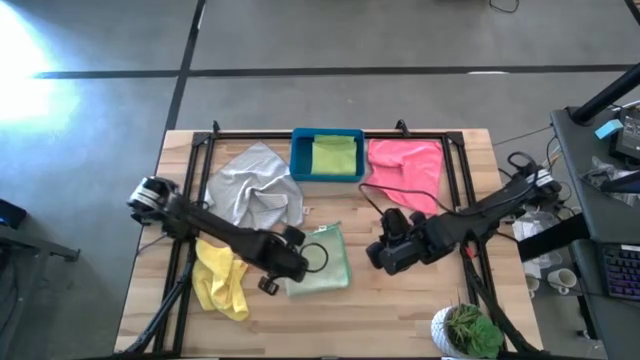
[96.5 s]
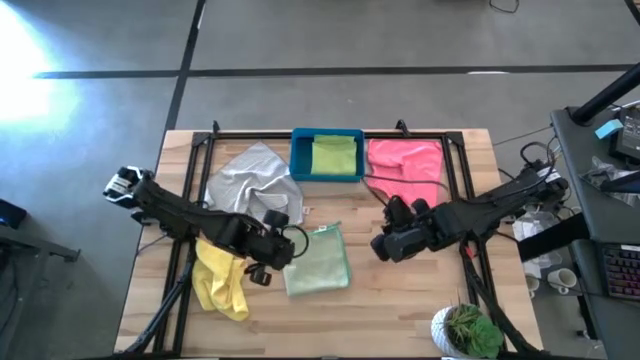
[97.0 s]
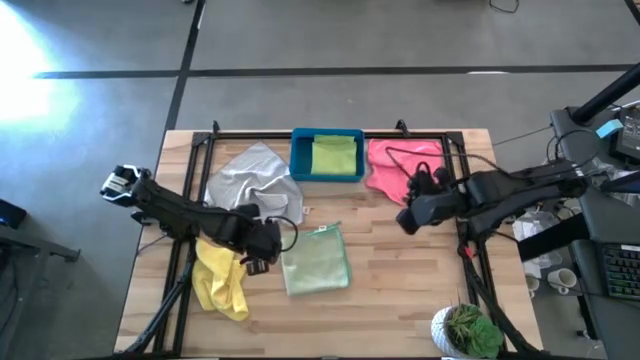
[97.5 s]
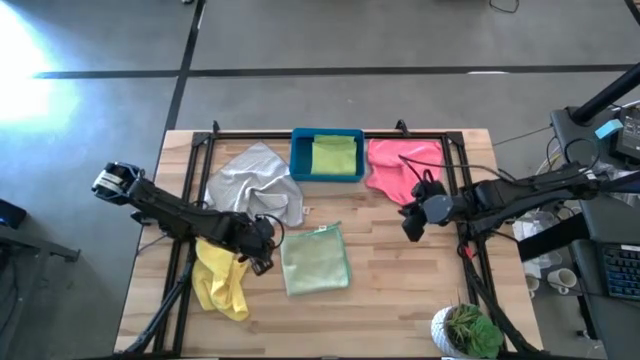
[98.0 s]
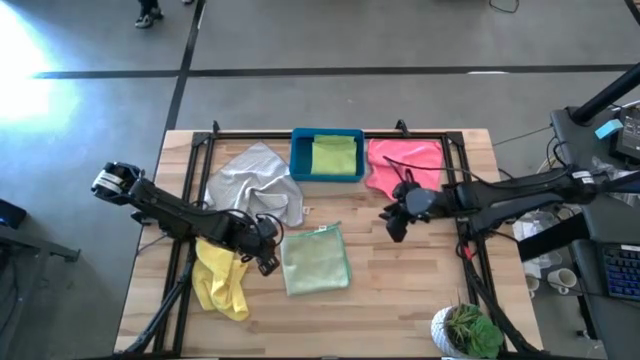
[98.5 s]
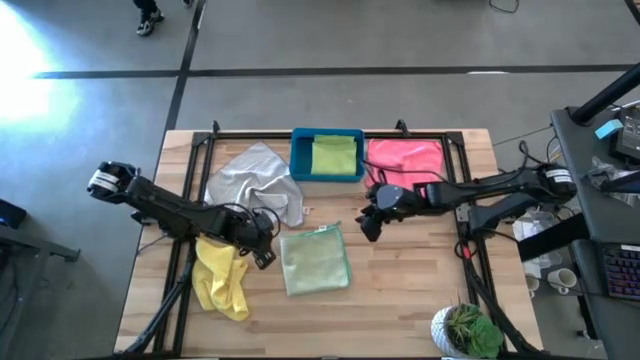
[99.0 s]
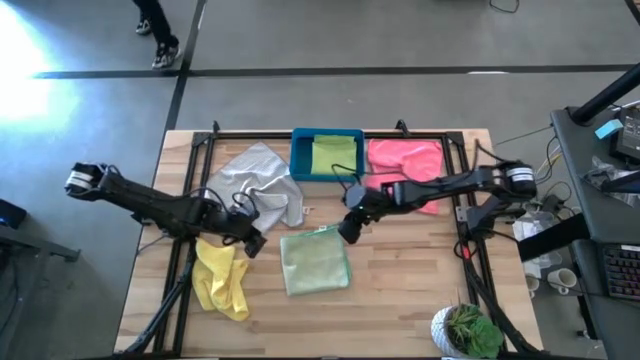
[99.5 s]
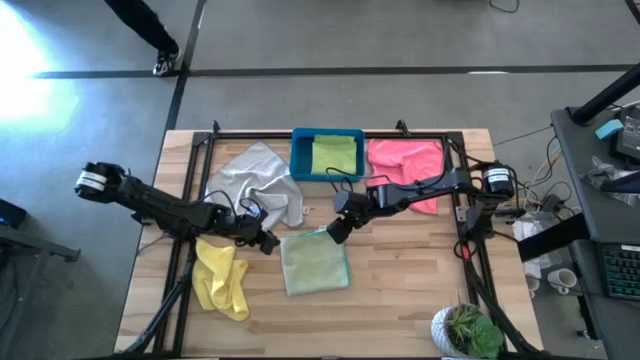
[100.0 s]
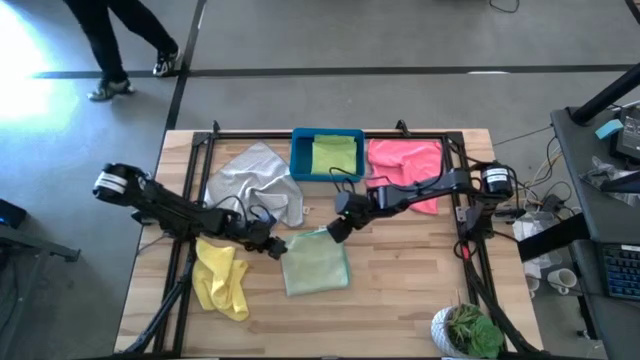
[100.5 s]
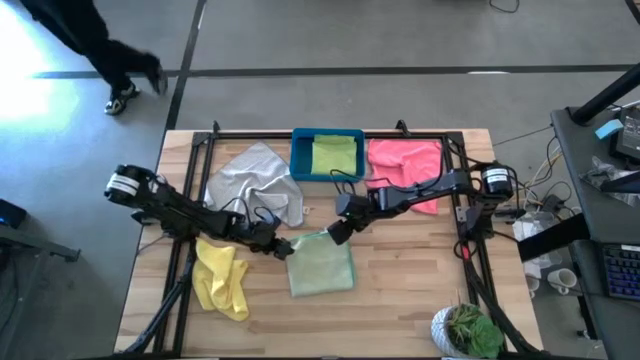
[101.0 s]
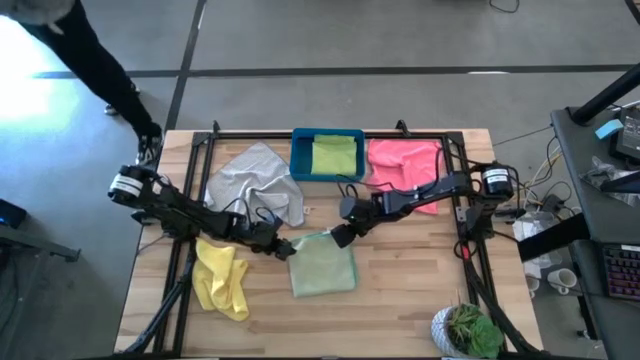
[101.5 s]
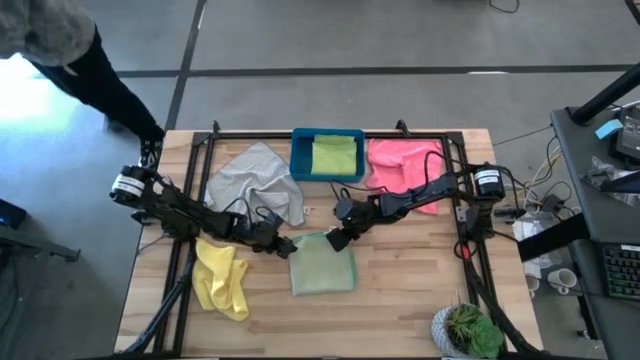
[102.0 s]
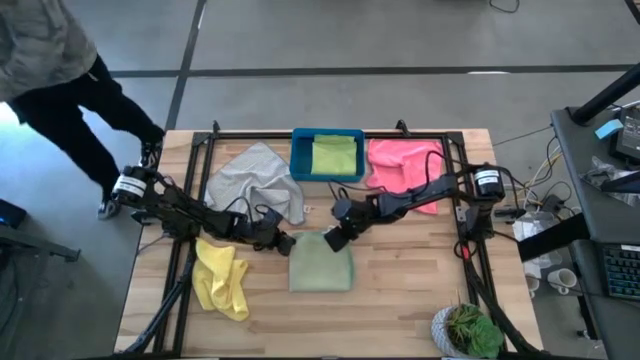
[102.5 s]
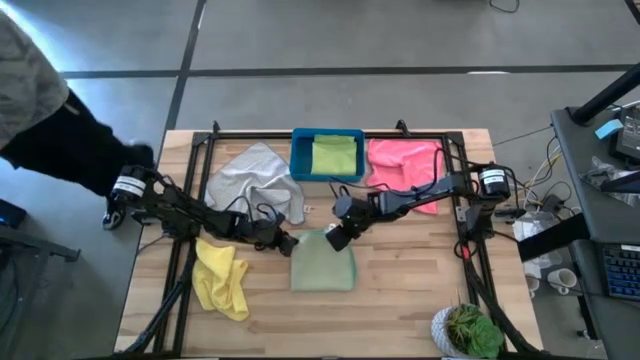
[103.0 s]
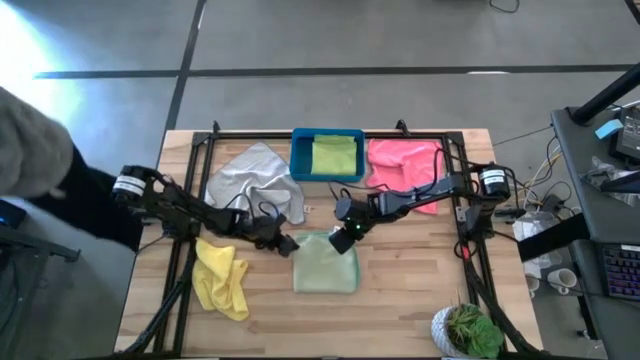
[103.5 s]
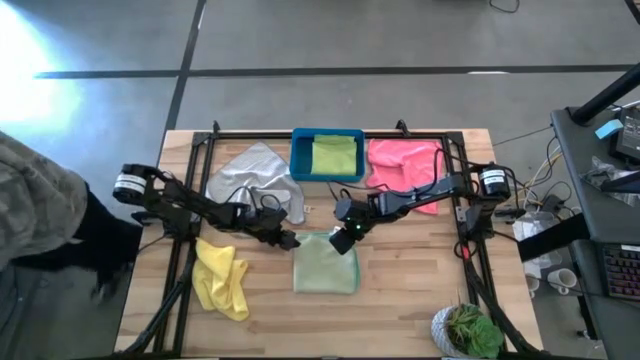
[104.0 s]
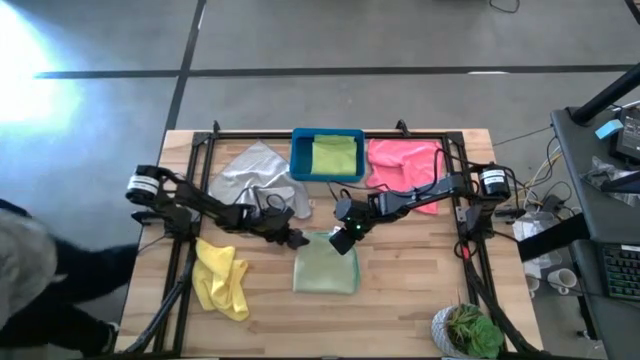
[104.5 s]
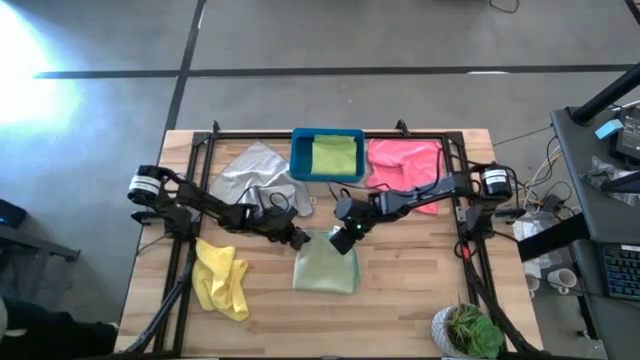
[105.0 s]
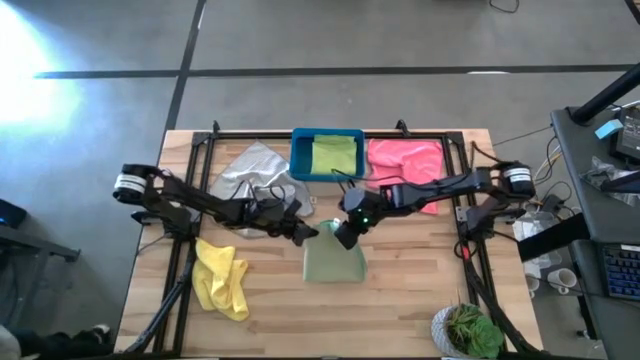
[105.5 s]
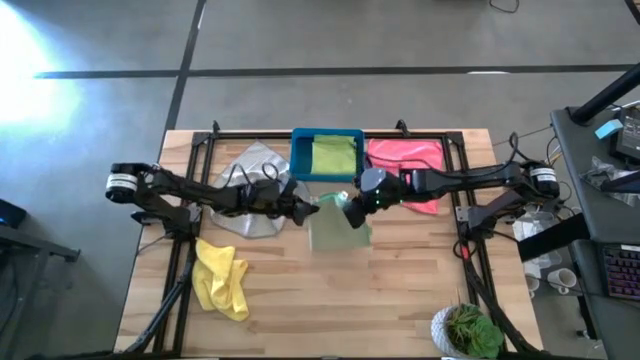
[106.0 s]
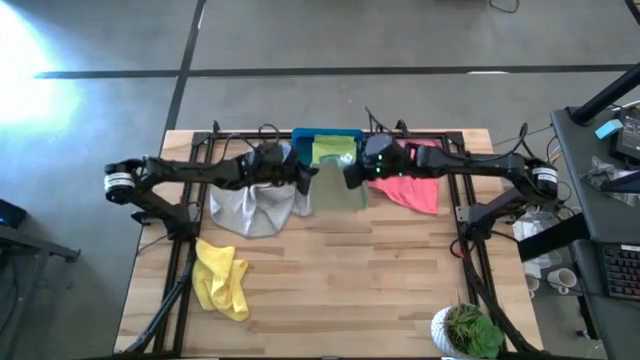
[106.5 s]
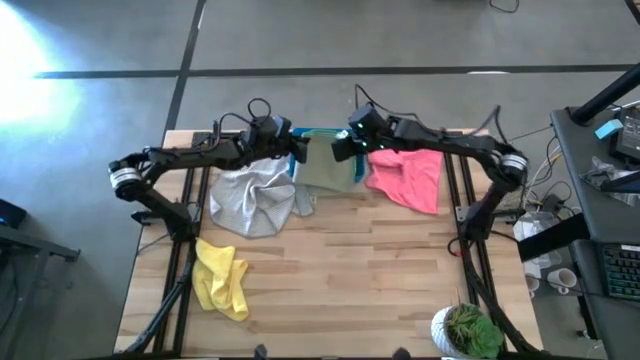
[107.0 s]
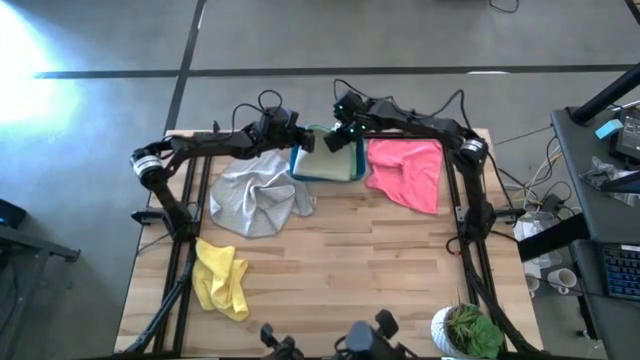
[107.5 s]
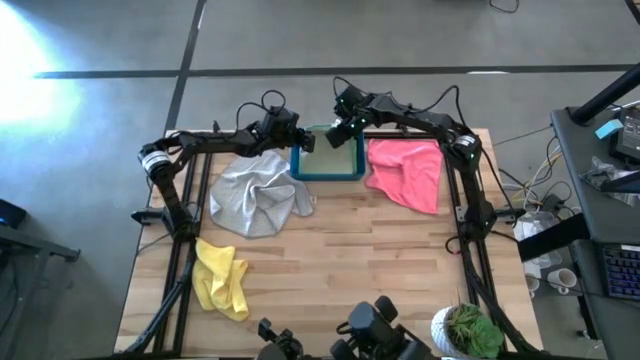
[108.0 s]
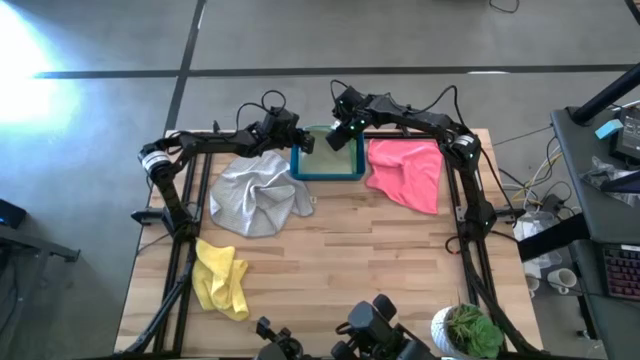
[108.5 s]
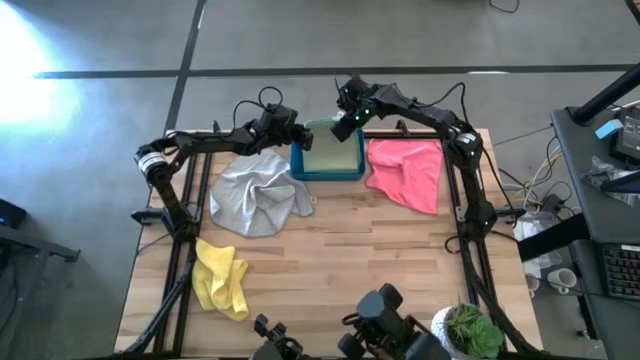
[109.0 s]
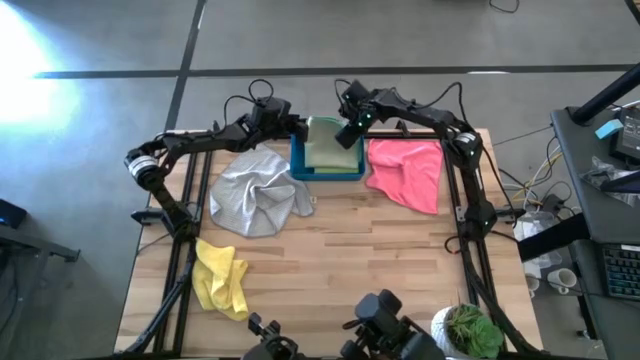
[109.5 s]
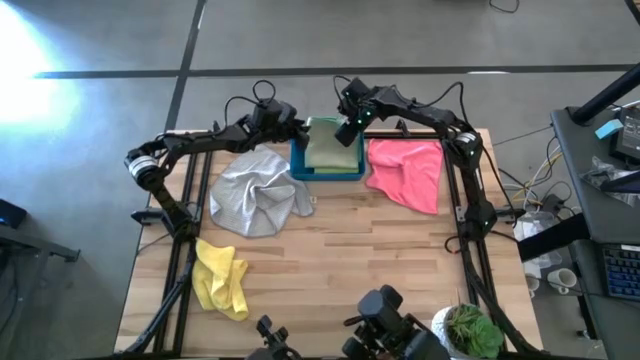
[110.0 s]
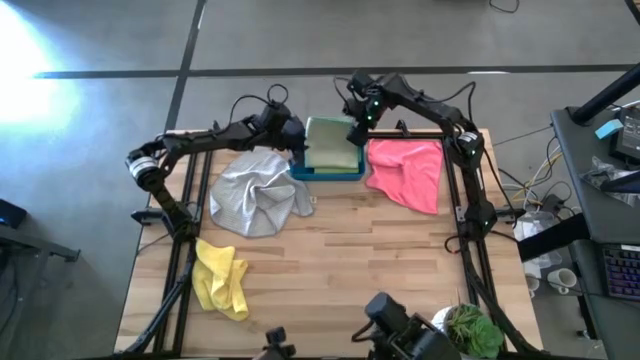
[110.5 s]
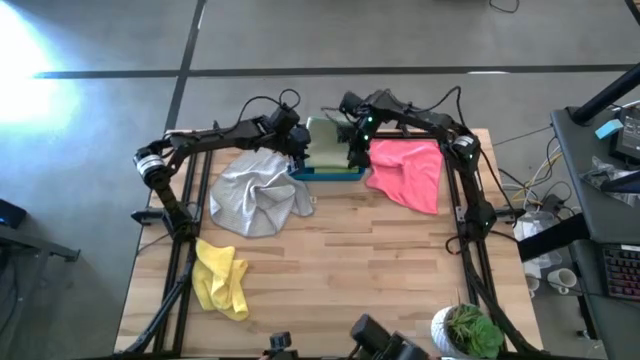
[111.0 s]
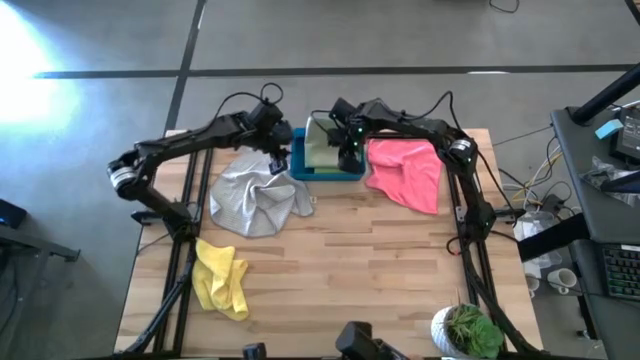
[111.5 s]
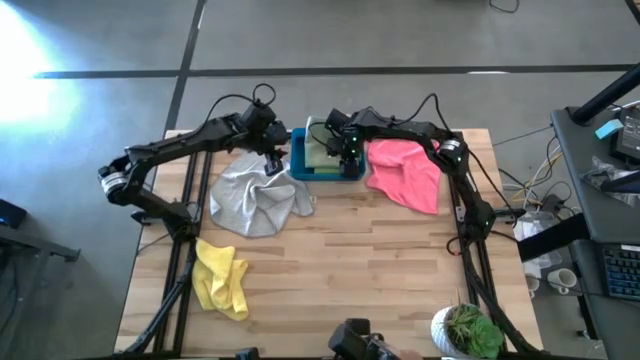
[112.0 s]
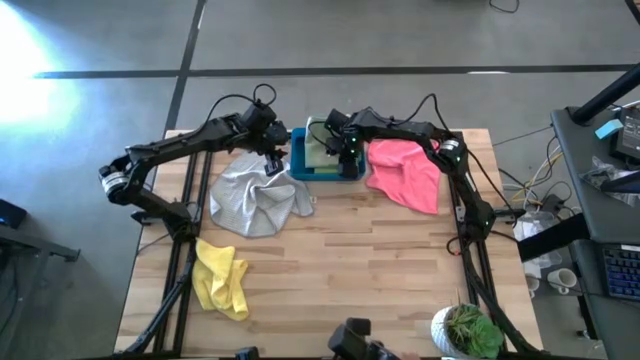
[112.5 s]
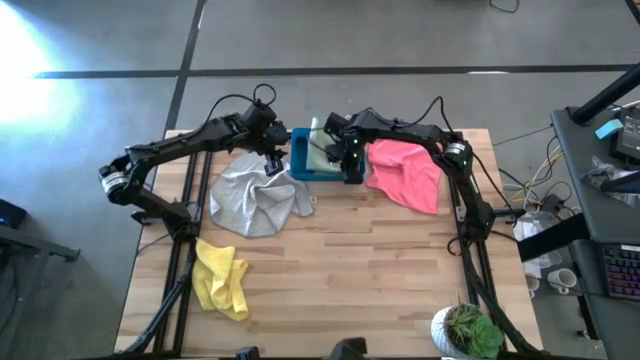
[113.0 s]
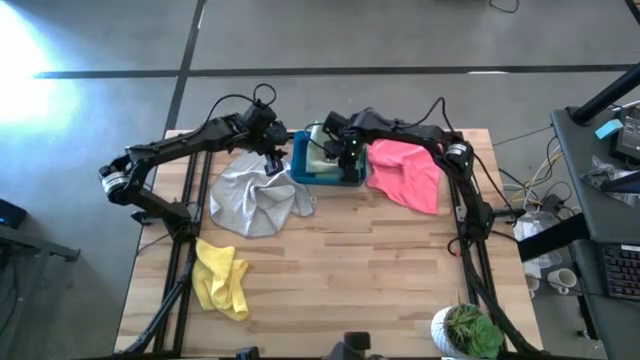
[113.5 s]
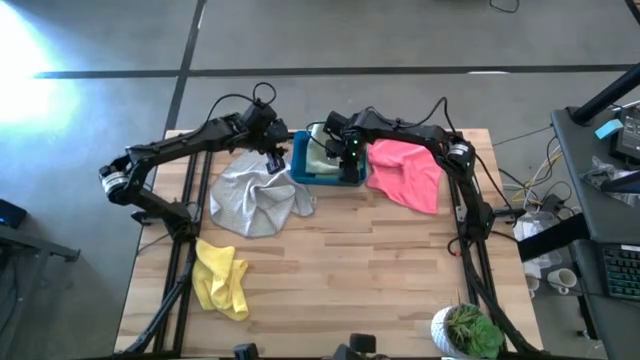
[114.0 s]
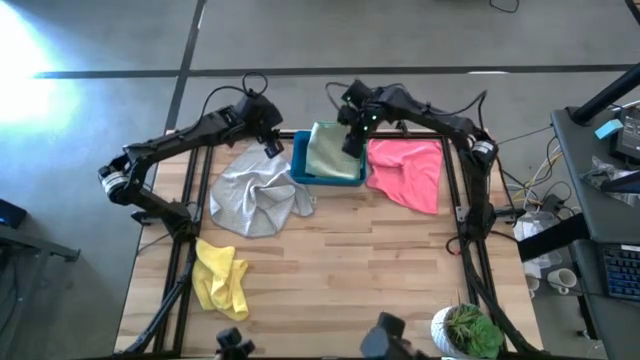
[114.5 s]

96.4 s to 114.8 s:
Task: Fold microfiber towels
Put the green microfiber cloth into the blue bin
